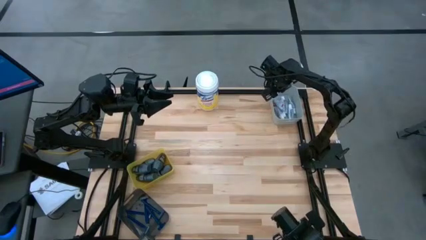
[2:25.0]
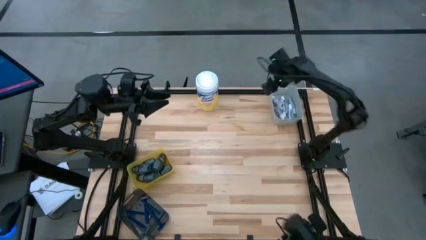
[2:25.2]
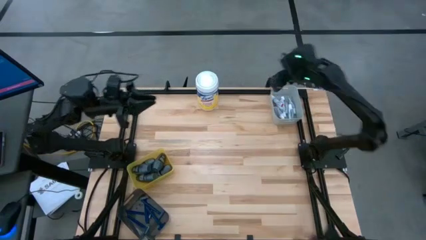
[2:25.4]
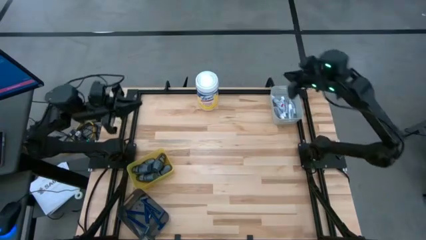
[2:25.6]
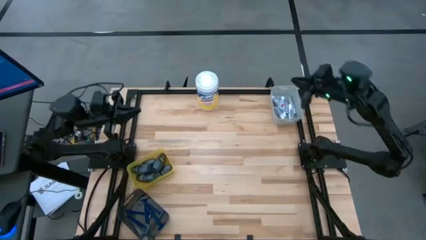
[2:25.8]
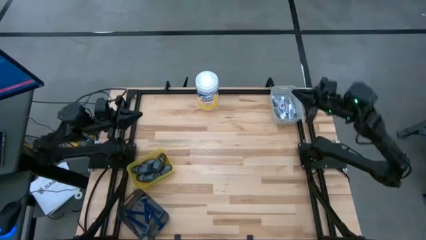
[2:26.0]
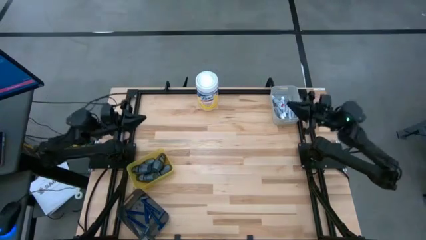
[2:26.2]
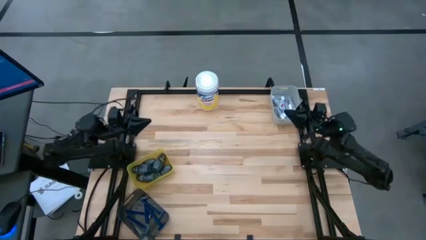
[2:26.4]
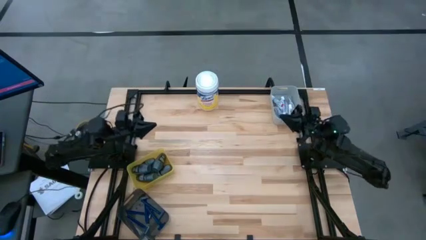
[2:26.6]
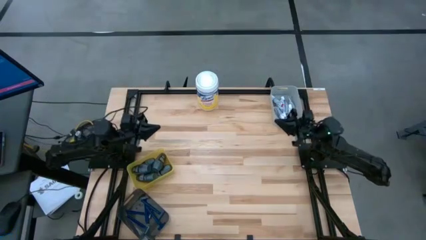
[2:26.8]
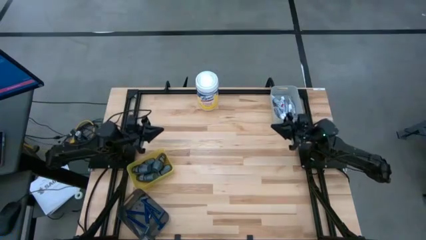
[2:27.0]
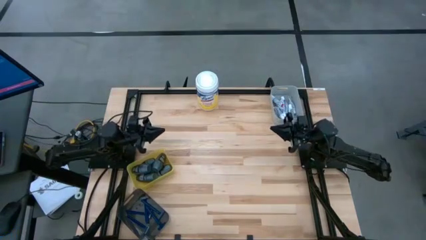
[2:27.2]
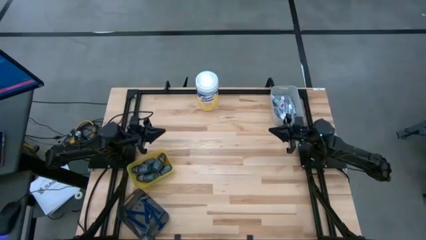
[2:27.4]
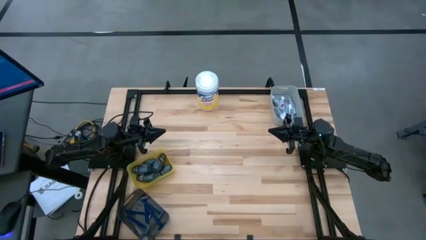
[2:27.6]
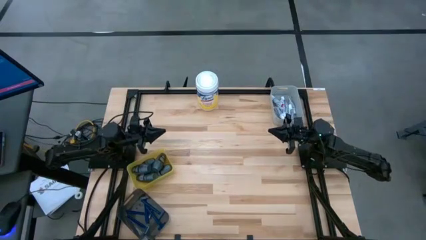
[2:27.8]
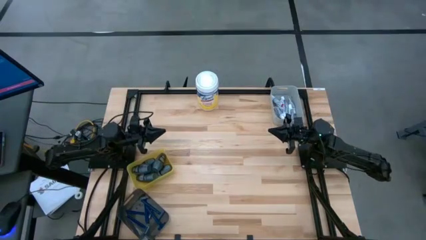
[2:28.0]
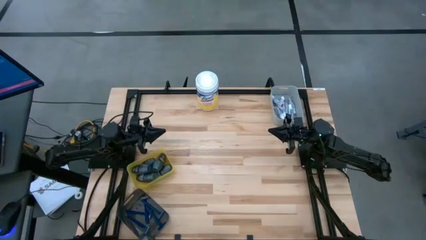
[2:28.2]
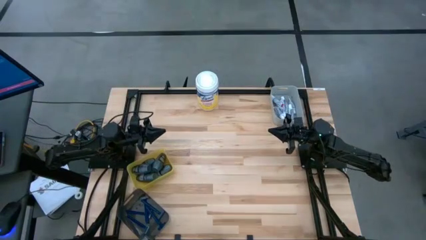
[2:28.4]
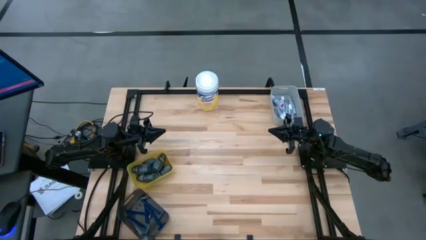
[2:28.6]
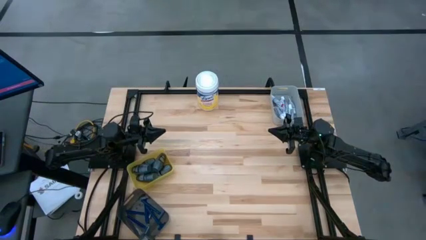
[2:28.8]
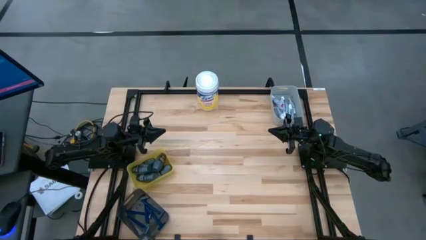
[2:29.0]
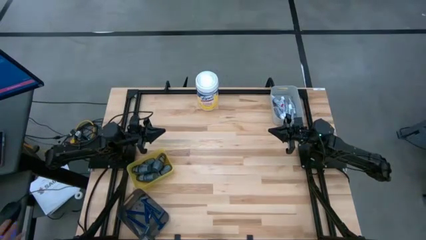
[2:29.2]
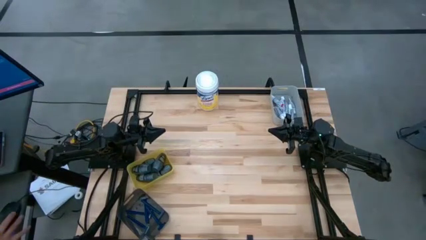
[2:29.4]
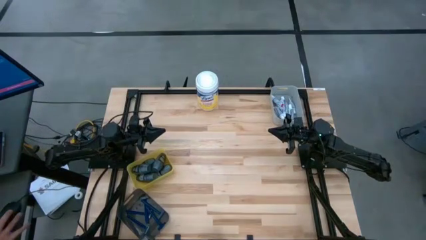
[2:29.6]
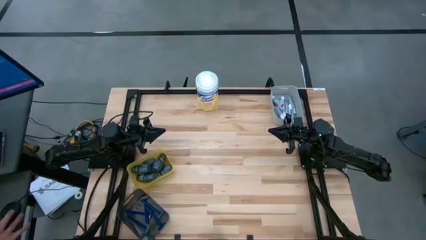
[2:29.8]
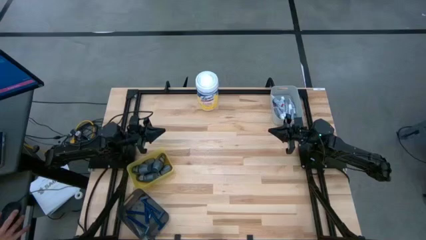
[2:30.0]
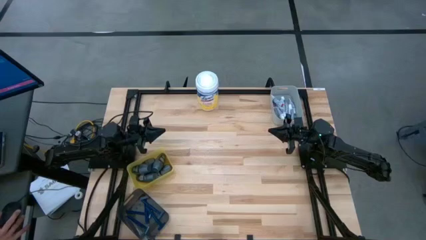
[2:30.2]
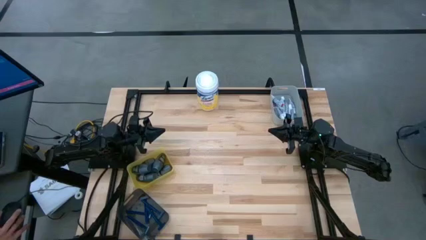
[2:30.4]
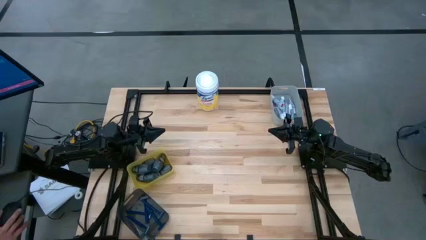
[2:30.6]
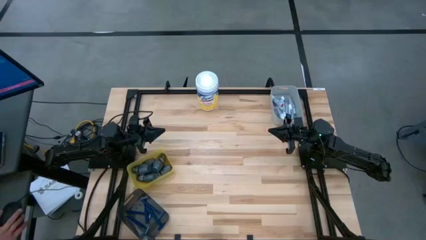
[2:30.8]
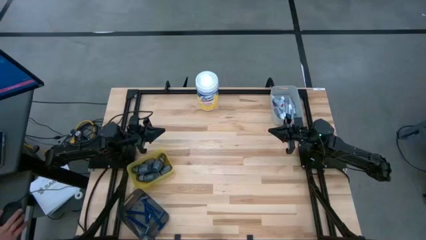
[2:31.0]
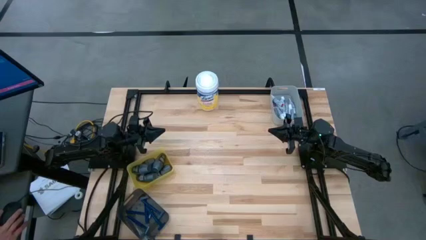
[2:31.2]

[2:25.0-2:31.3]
Task: Pick & Place Travel size toiletries
Return to Home Position

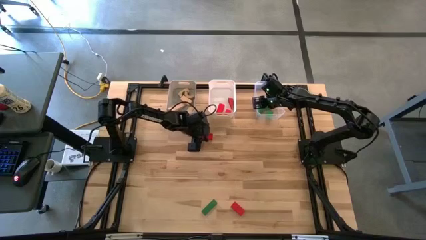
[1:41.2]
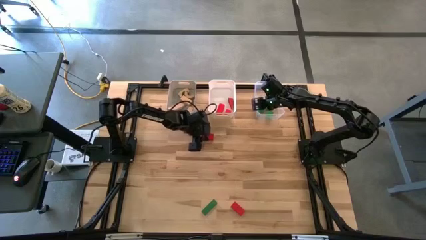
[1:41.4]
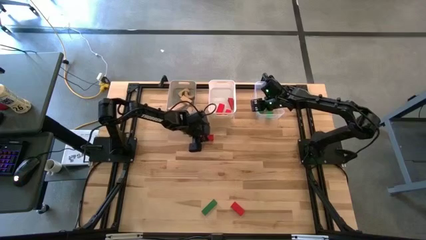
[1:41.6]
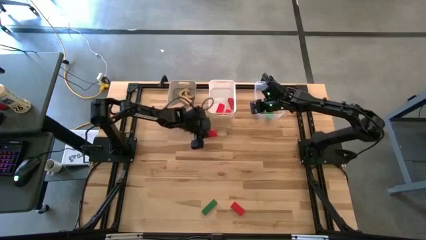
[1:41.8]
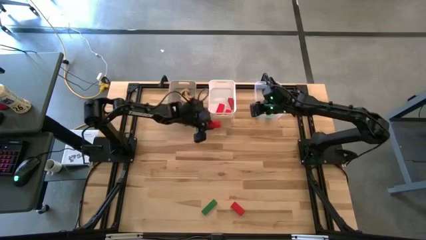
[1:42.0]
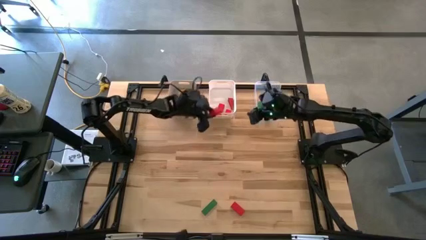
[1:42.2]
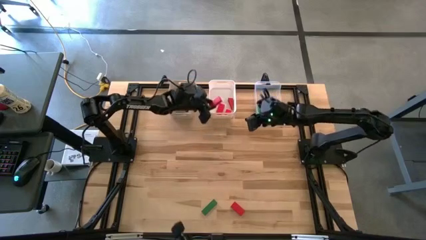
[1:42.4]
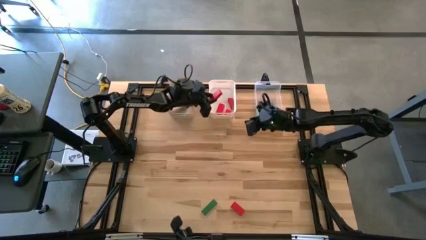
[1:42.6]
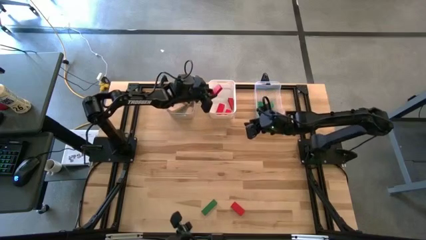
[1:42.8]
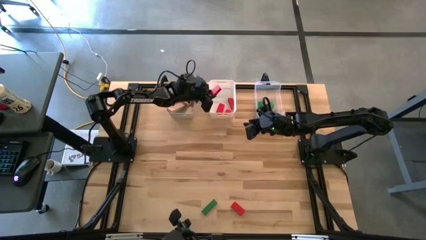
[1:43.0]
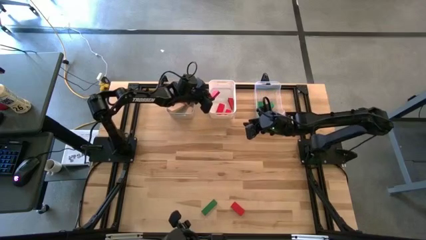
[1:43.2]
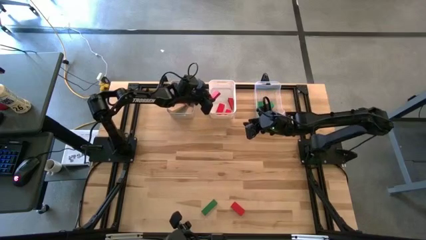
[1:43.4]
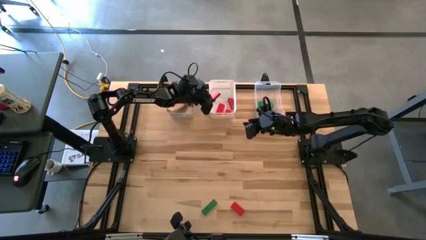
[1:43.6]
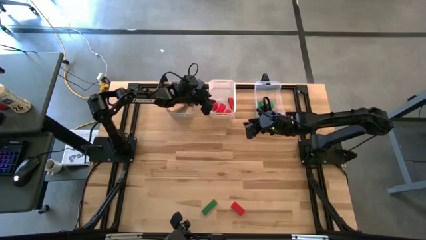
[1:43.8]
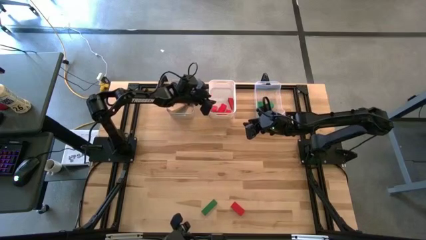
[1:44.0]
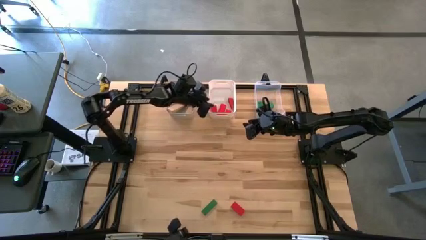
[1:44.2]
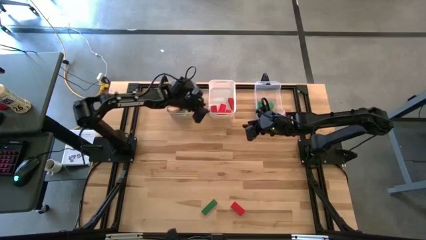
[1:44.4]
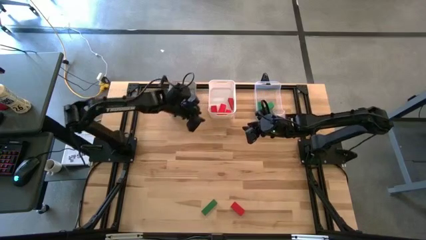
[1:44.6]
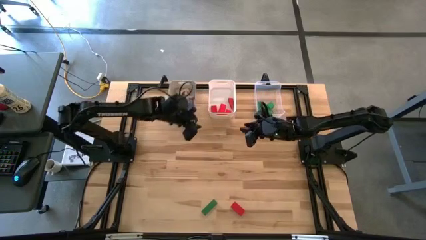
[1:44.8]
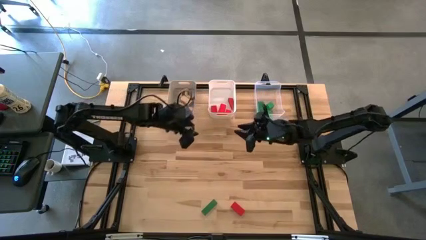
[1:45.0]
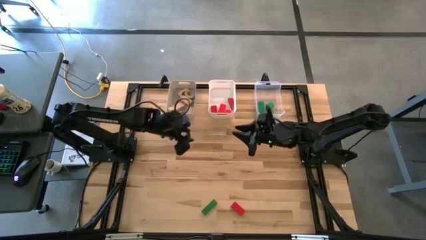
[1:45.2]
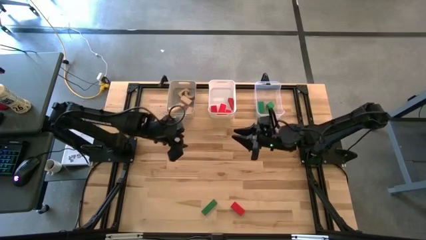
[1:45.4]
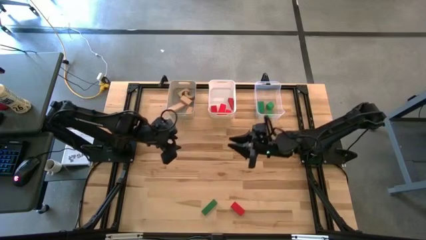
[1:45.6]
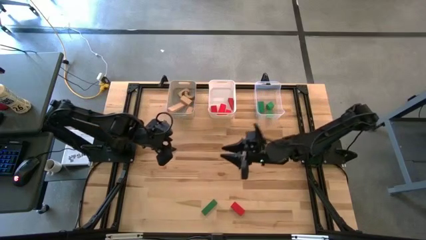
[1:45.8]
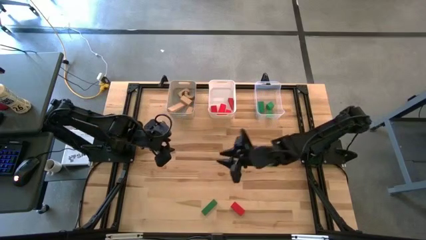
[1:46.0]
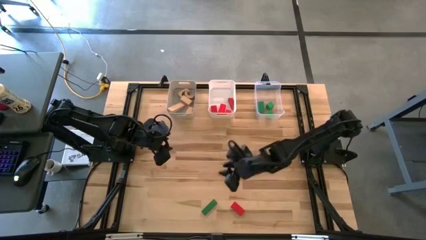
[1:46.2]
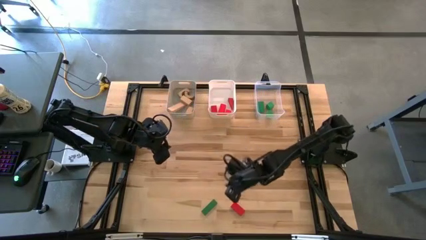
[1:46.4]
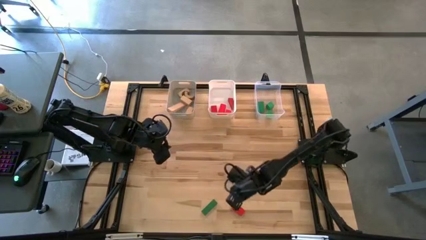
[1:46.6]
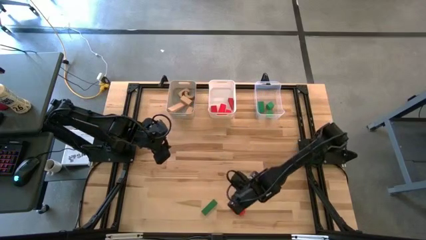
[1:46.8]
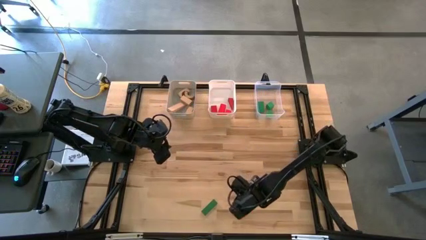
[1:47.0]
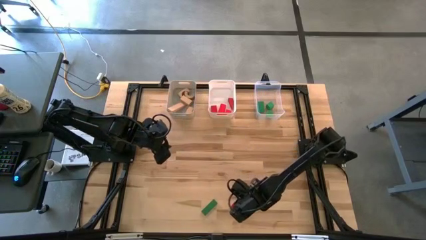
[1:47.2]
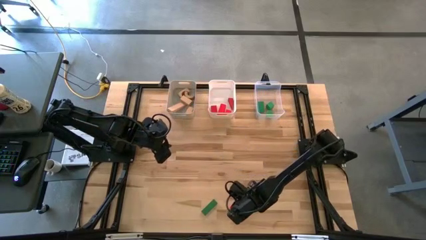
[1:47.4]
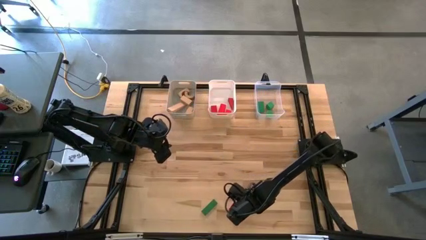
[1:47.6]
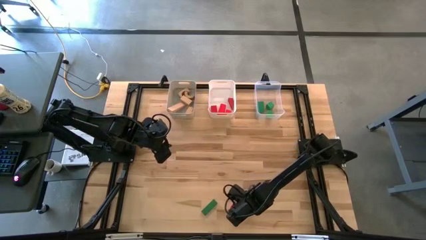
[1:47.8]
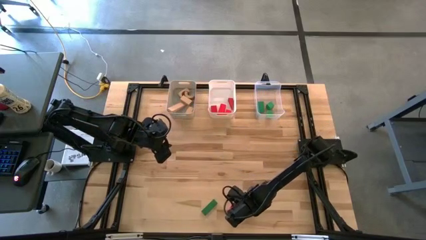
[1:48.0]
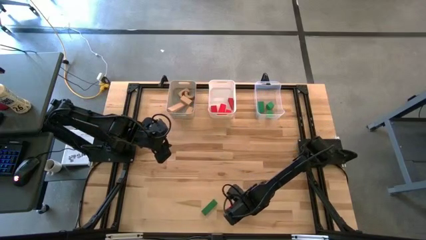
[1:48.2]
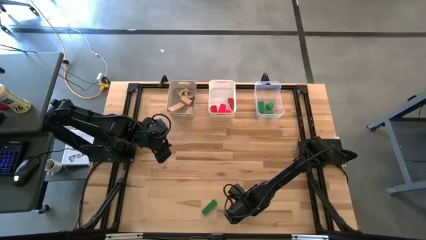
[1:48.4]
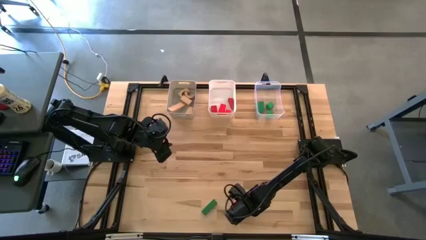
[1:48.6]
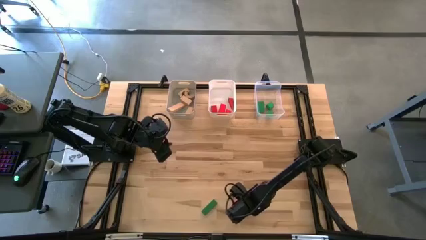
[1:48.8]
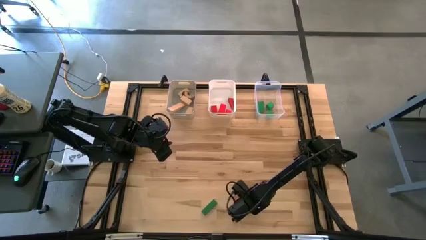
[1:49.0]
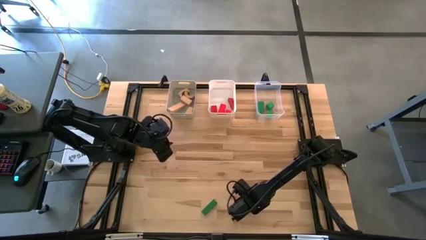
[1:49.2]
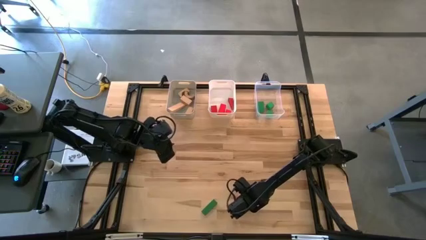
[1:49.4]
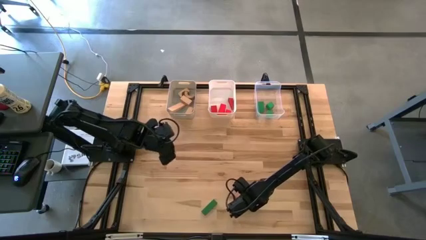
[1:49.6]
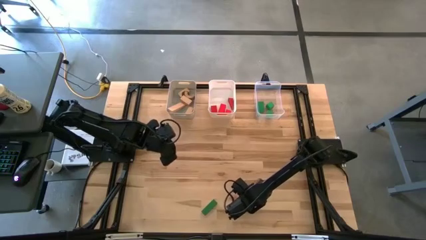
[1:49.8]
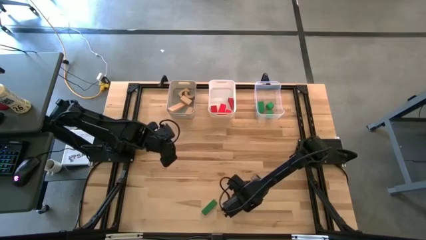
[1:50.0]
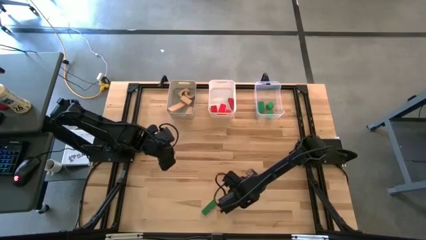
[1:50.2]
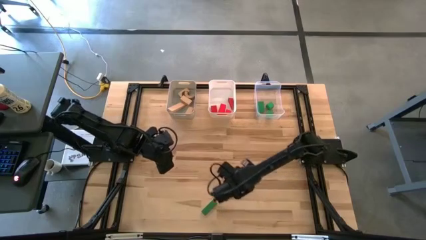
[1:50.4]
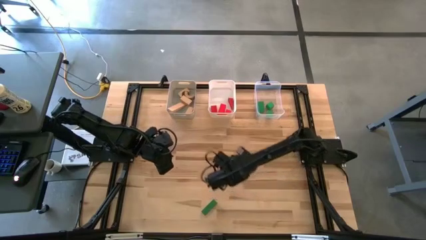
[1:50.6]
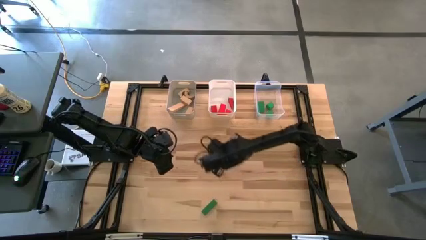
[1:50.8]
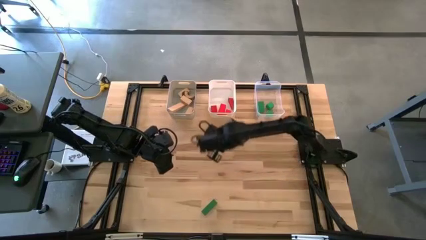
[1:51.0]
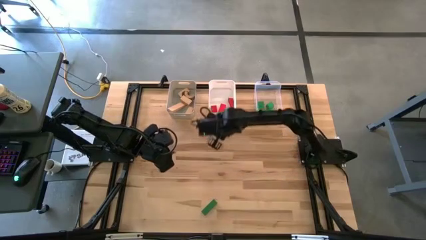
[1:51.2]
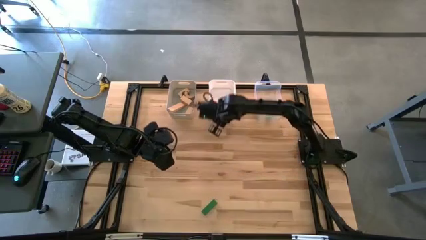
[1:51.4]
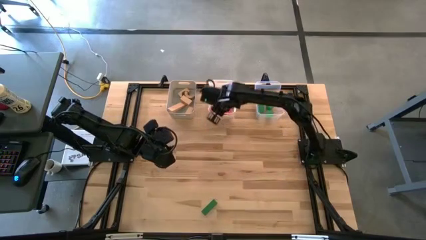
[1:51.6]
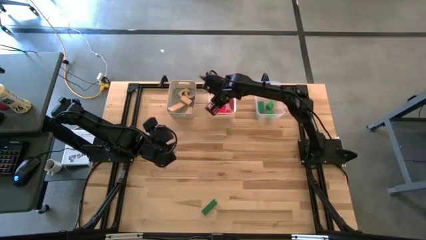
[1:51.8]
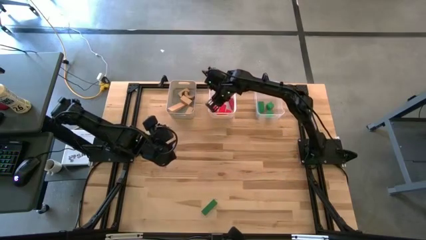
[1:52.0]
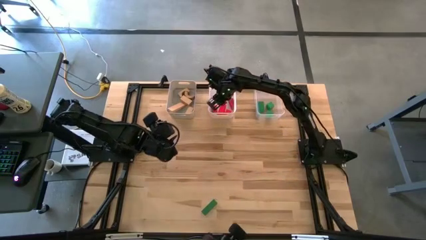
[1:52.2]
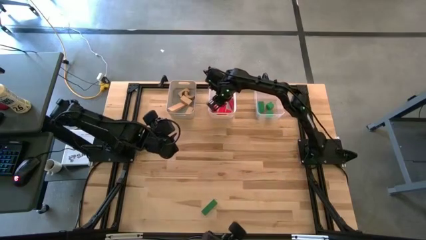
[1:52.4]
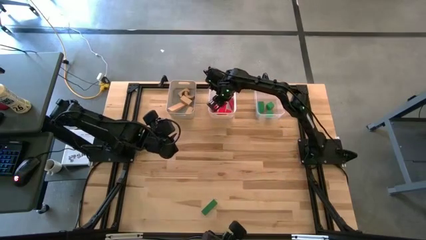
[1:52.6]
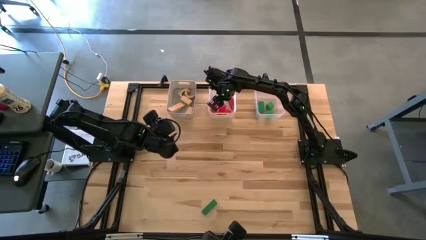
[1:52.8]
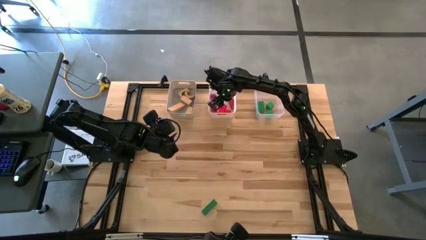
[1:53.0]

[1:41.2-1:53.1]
Task: Sort & place blocks by color
Put the top red block into the white bin
